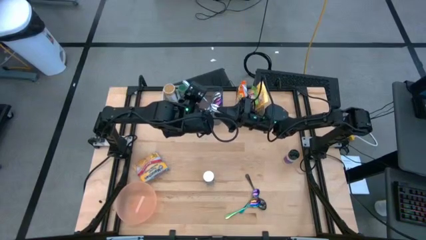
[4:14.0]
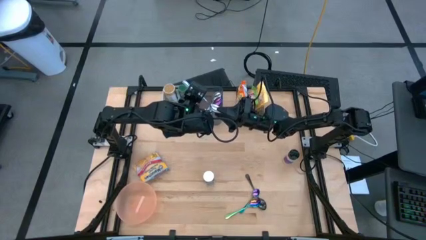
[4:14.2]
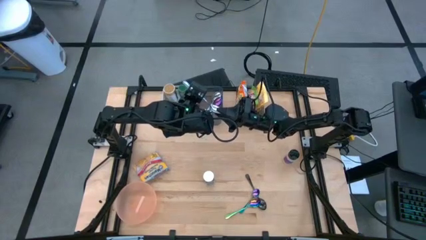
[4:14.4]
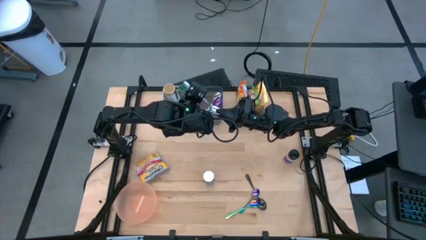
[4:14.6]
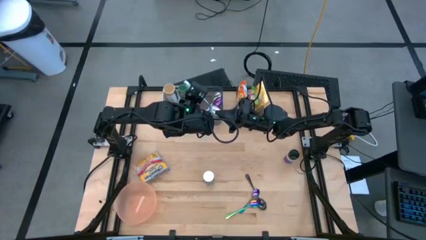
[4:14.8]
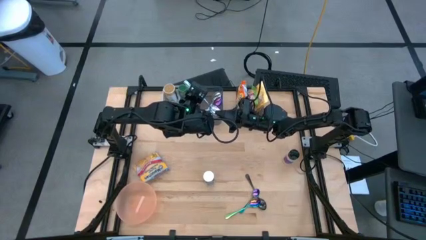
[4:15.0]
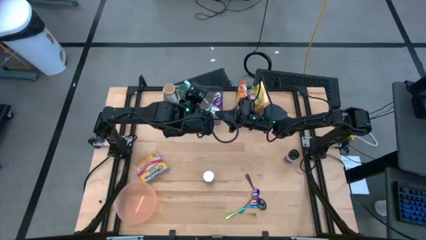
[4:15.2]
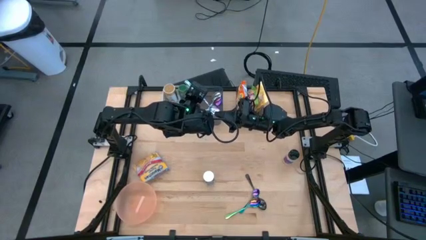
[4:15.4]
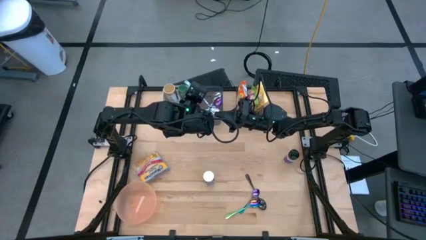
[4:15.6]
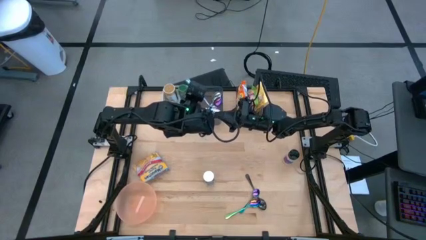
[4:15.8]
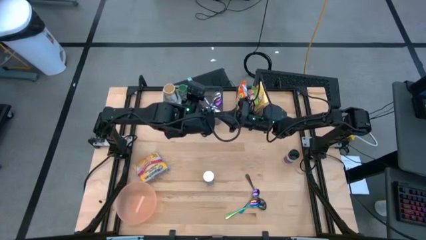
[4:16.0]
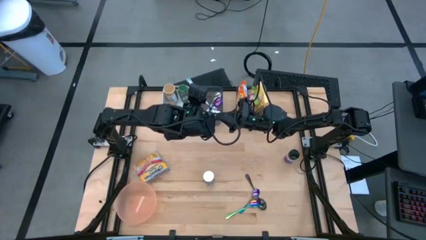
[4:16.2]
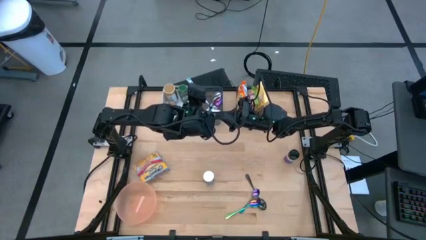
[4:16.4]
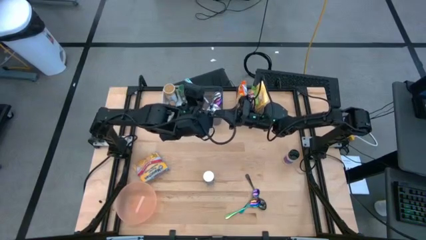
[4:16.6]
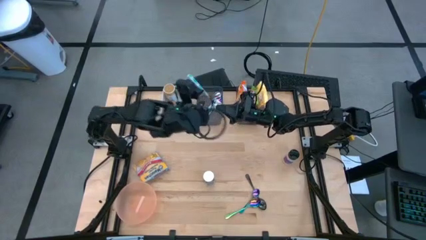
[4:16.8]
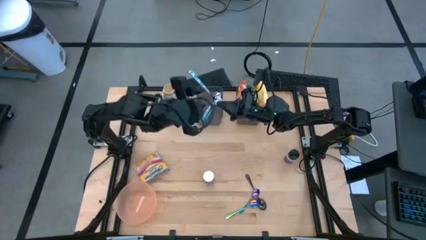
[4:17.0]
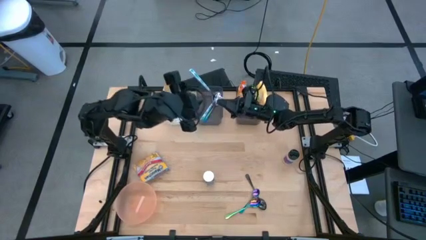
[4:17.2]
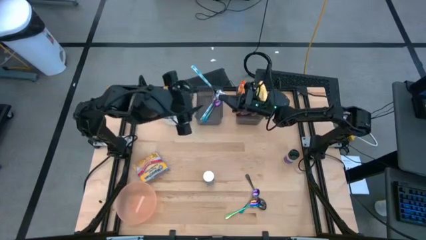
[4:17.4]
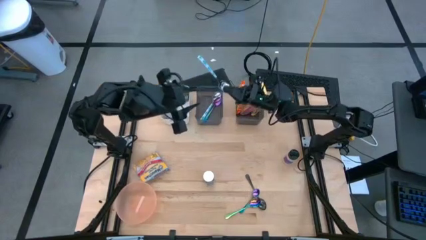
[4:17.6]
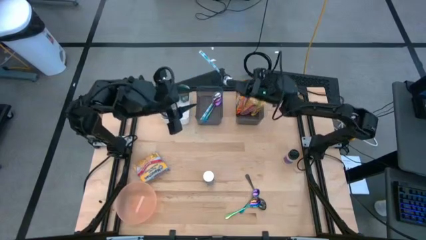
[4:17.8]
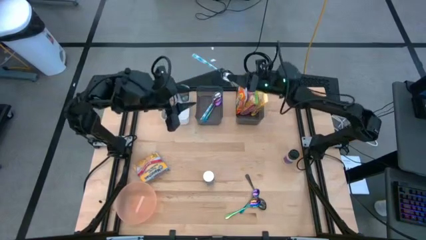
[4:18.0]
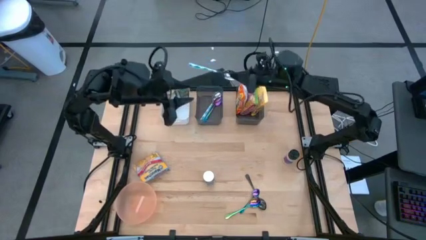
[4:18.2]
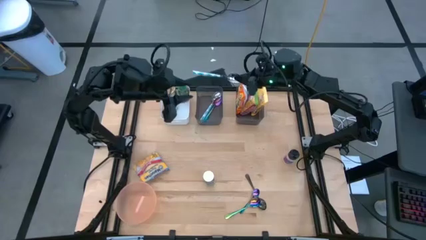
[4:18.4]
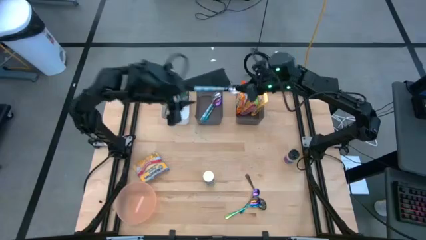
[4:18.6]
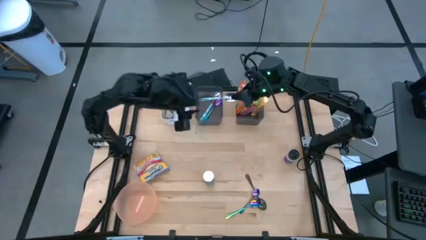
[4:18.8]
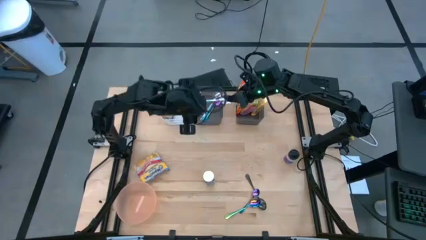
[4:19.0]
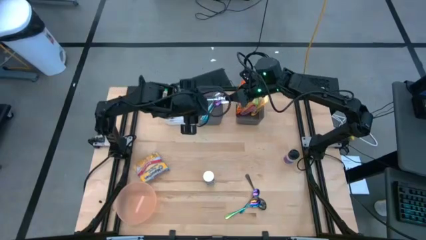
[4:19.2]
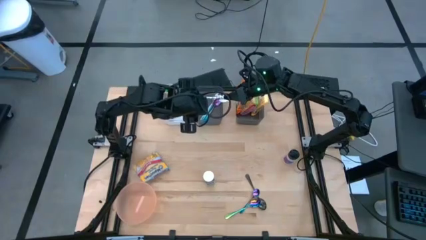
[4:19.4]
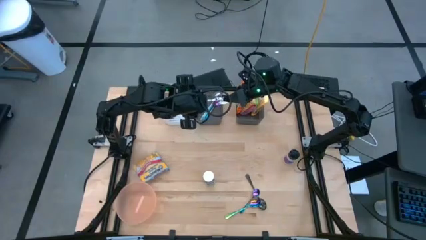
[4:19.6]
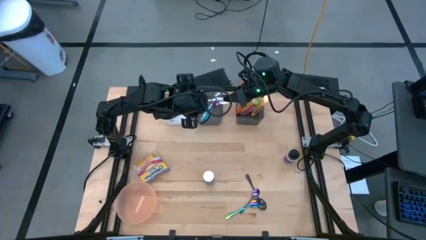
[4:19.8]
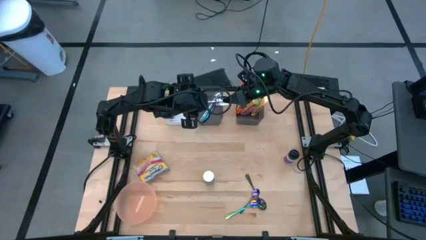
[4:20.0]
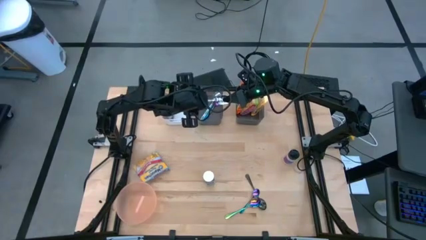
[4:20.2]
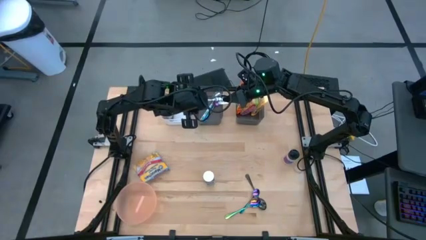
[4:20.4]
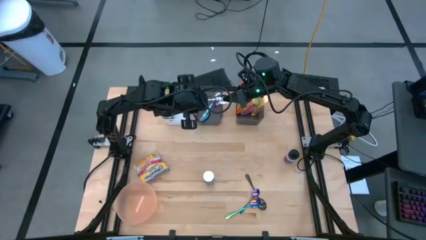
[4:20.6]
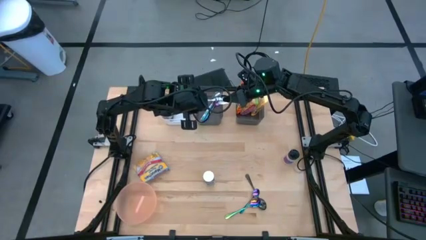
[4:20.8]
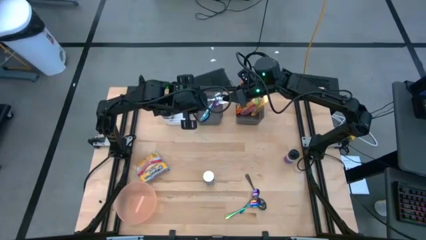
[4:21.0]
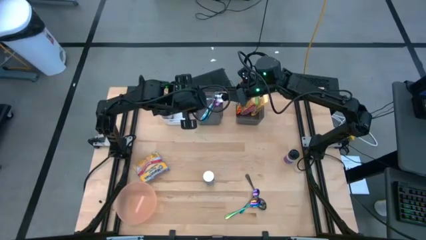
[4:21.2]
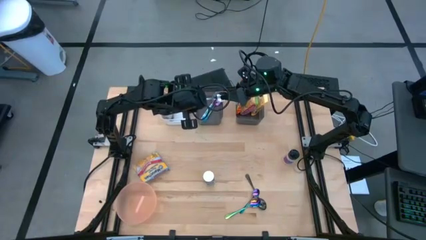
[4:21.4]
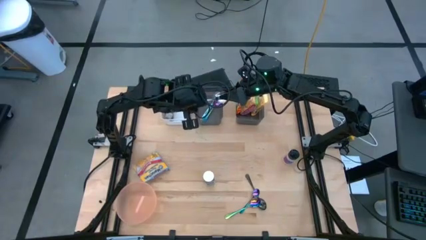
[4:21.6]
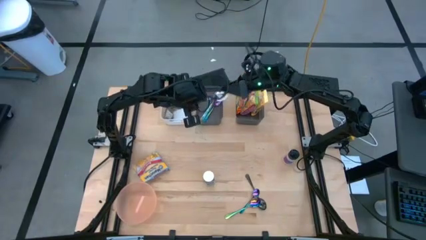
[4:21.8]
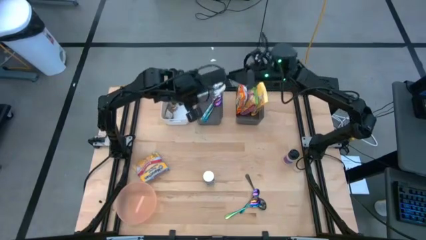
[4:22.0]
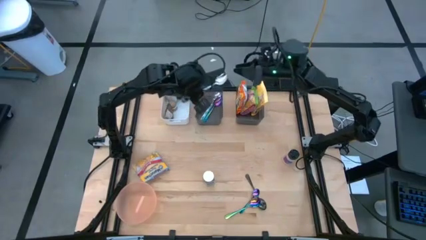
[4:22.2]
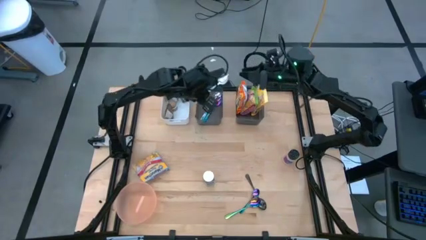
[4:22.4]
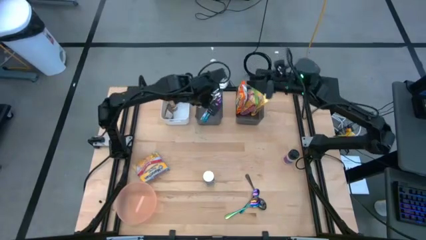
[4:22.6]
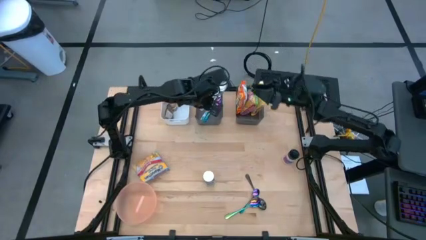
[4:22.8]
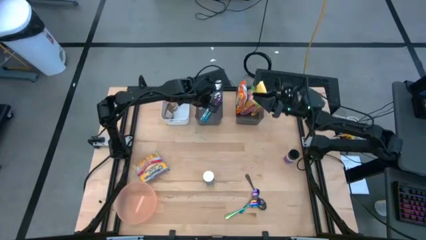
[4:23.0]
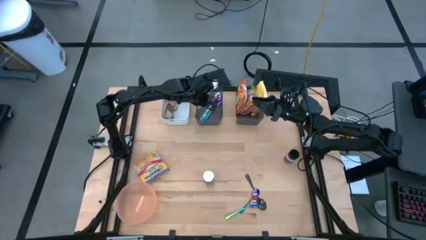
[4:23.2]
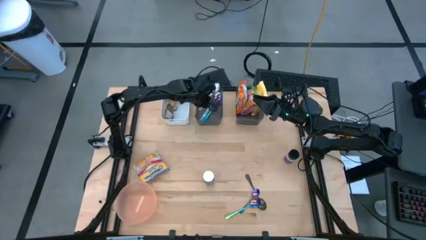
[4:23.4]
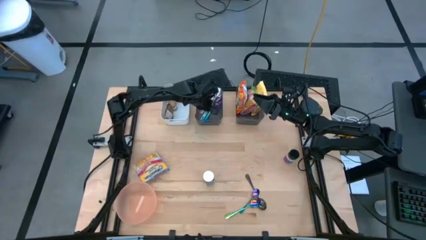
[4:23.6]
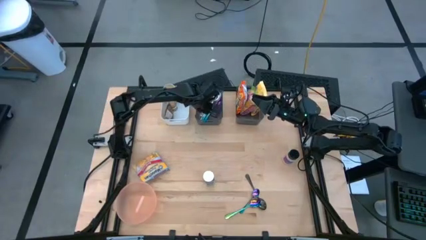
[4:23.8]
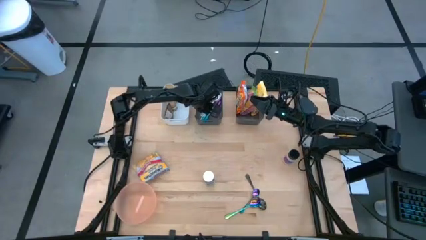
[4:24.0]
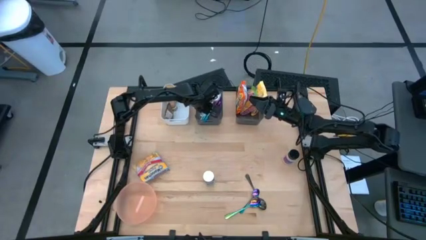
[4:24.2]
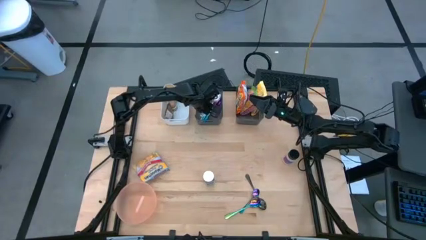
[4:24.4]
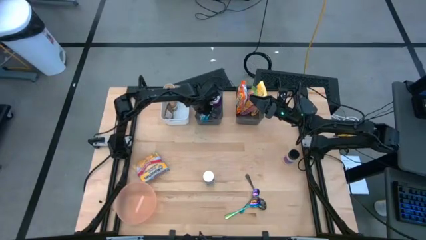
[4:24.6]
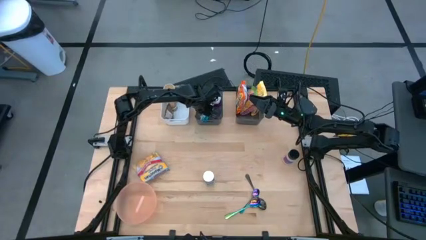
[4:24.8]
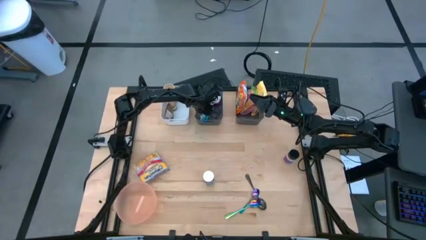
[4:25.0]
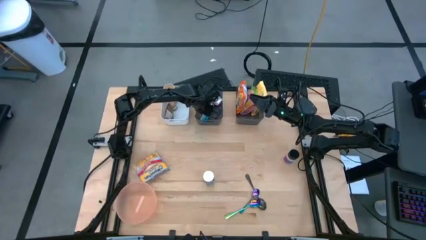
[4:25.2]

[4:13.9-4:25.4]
Task: Pick & Place Food Item
Put the patterned spoon into the left black bin

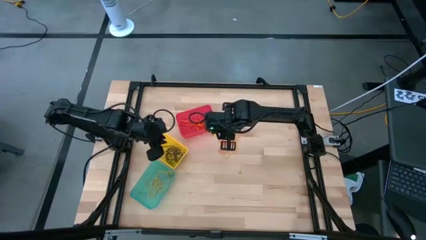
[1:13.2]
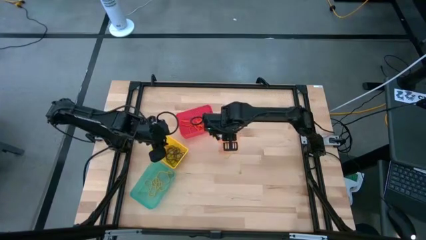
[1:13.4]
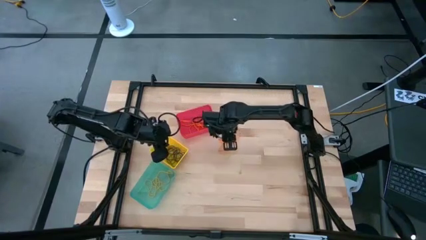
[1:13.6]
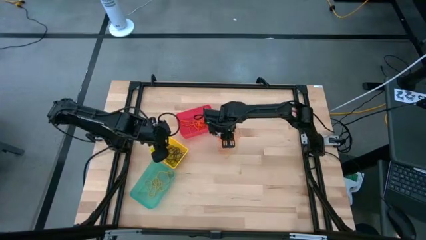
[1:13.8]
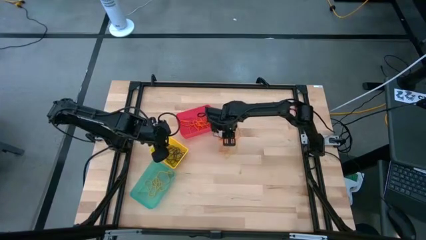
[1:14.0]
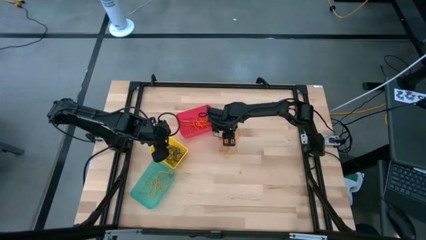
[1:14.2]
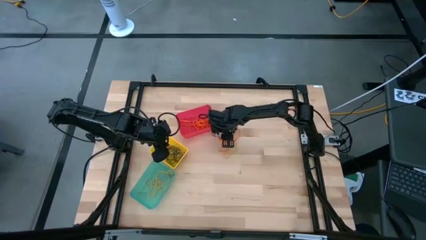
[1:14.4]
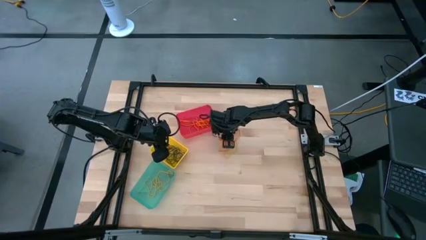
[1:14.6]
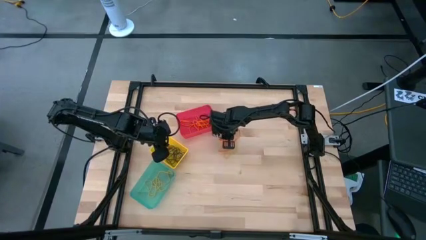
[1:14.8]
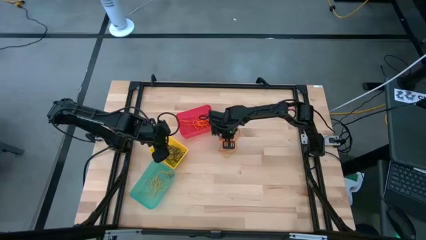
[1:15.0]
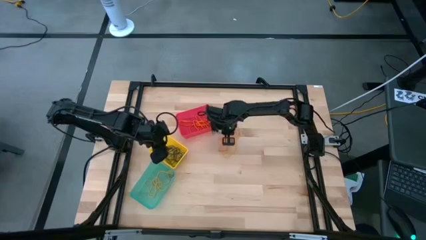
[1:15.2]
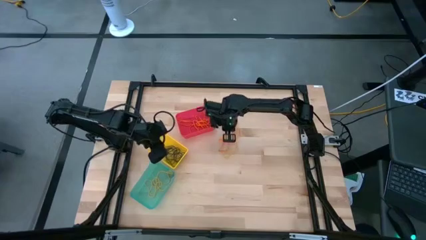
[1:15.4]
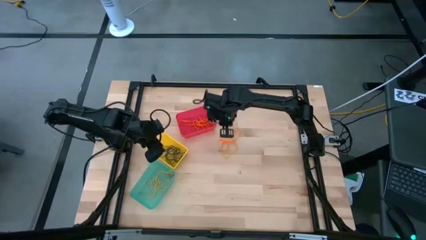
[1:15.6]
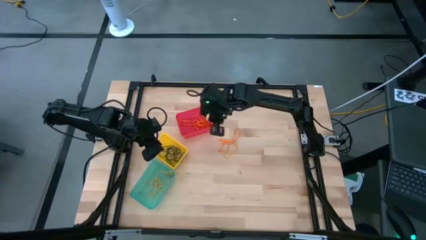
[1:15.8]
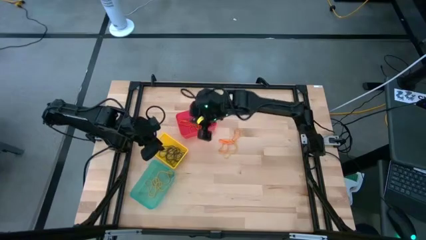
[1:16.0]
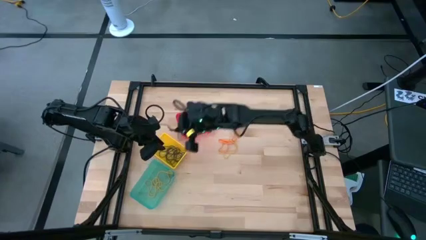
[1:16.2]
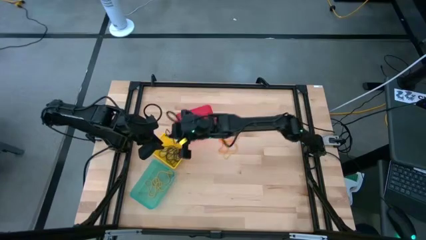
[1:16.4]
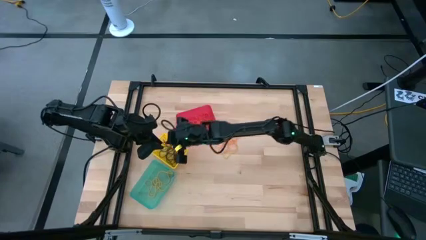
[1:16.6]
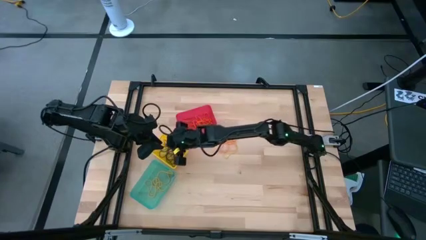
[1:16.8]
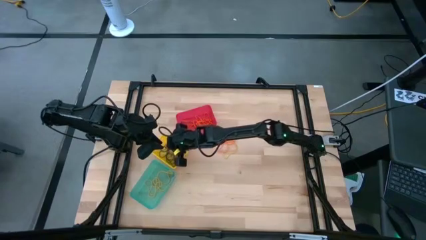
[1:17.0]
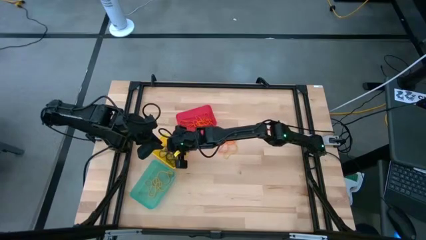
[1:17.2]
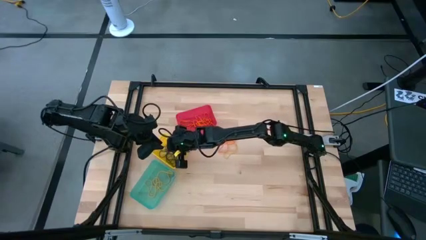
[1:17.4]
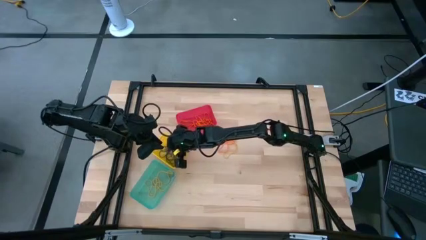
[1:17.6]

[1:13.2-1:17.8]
Task: Sort rubber bands into baskets
Put the black rubber band into the yellow bin
